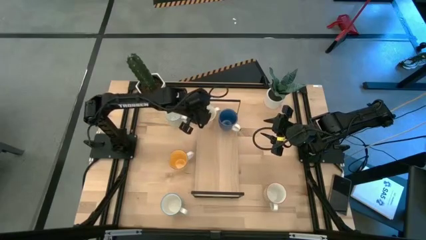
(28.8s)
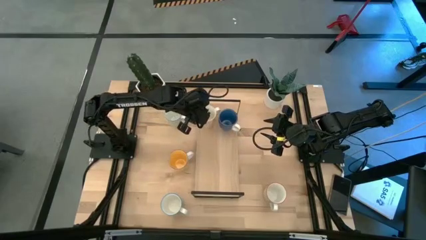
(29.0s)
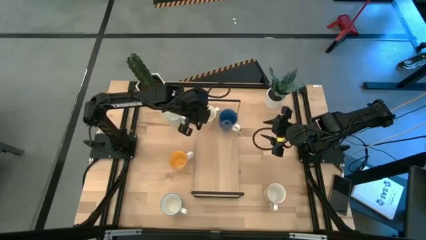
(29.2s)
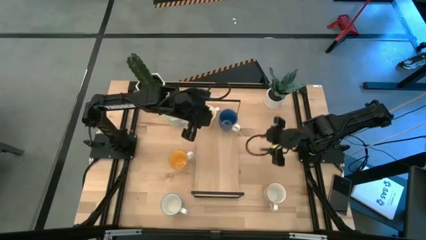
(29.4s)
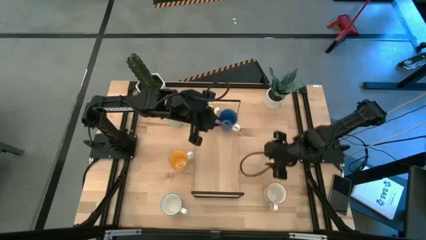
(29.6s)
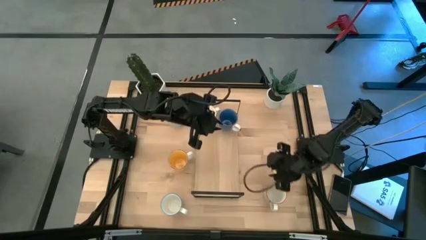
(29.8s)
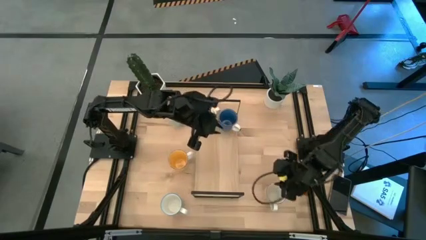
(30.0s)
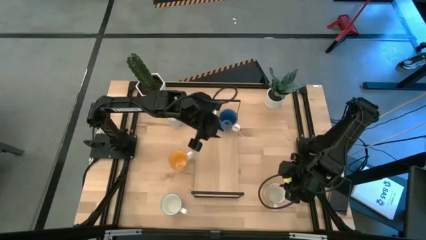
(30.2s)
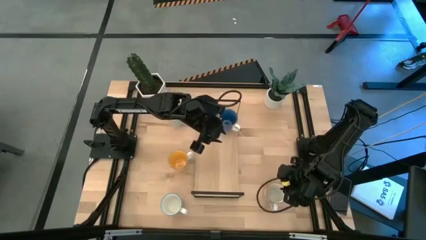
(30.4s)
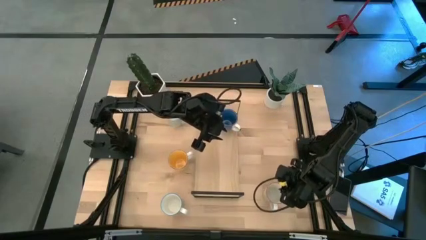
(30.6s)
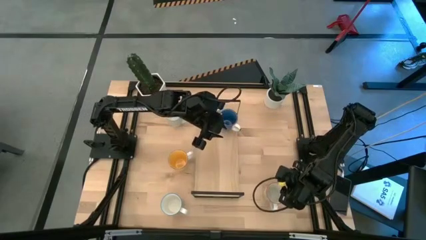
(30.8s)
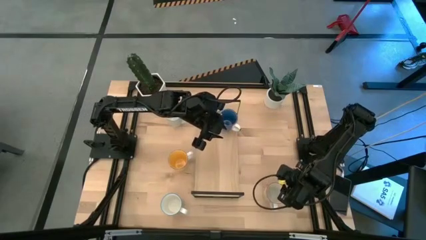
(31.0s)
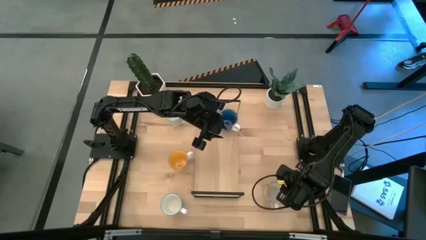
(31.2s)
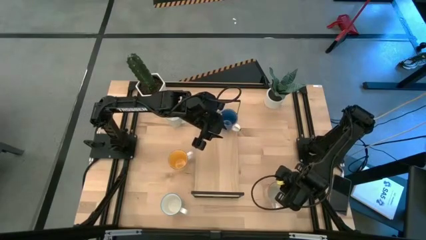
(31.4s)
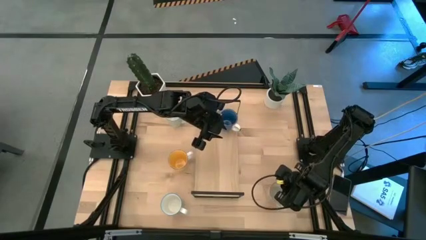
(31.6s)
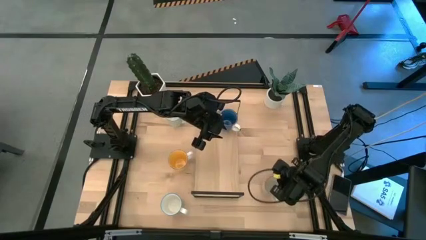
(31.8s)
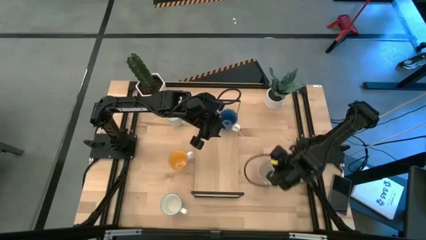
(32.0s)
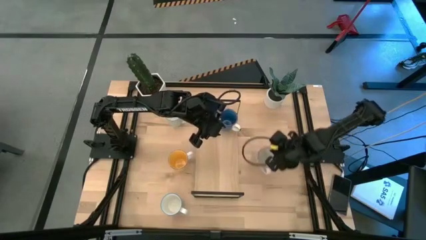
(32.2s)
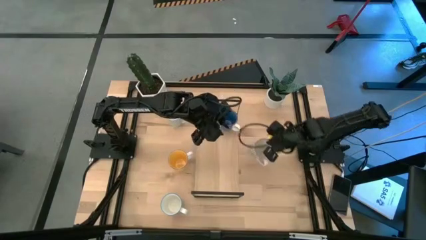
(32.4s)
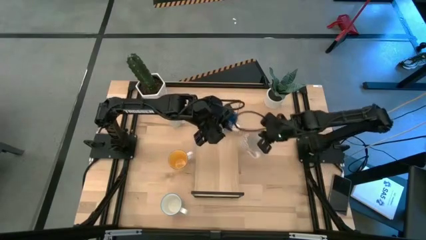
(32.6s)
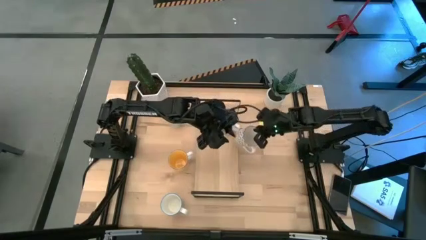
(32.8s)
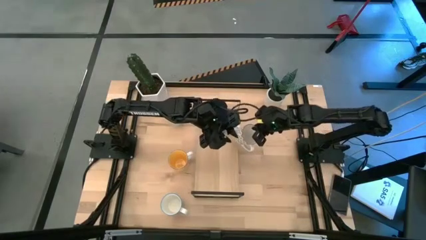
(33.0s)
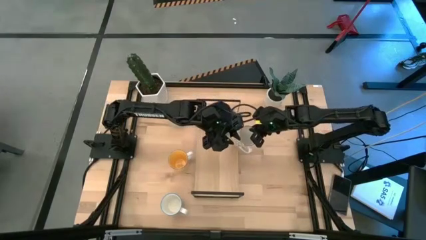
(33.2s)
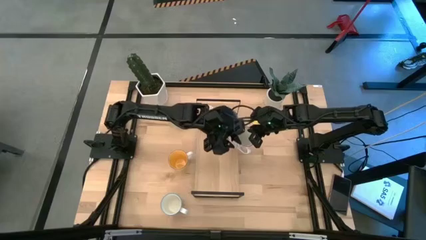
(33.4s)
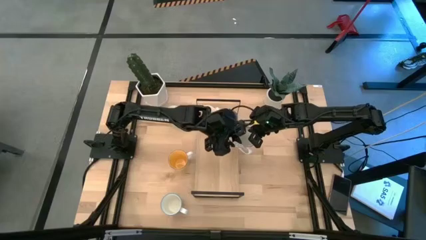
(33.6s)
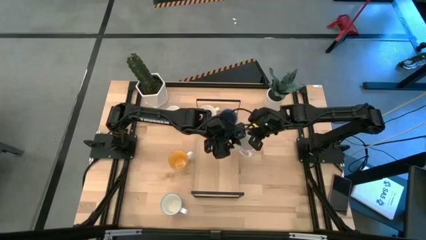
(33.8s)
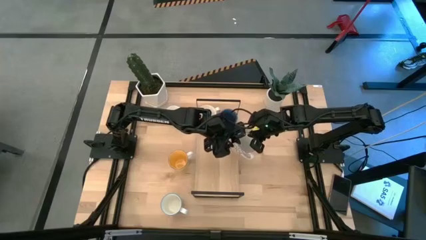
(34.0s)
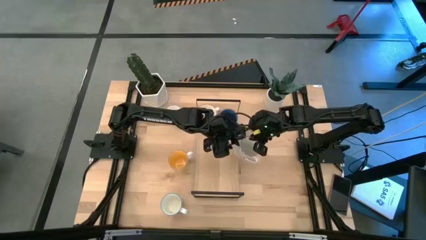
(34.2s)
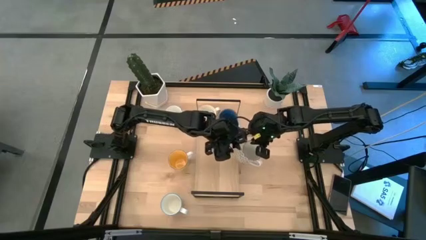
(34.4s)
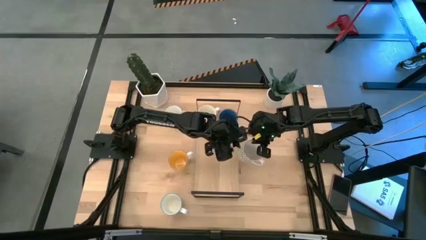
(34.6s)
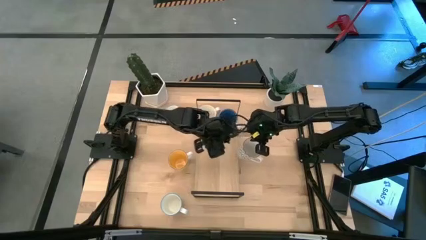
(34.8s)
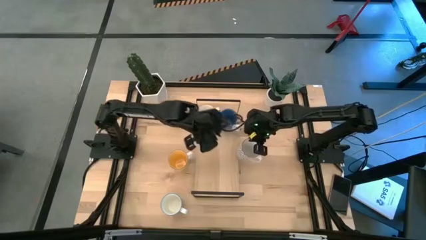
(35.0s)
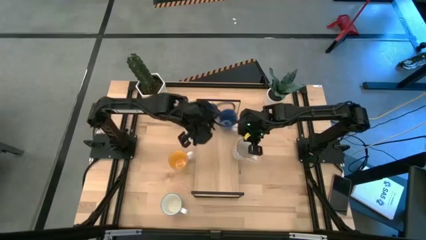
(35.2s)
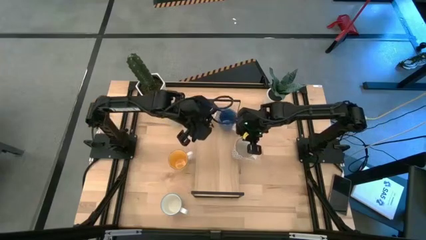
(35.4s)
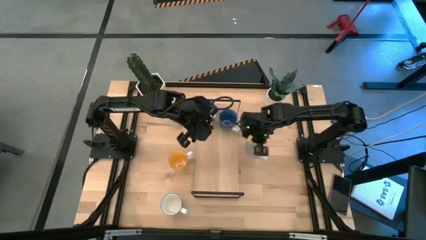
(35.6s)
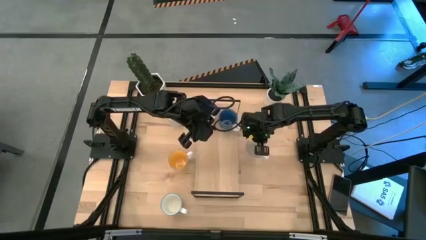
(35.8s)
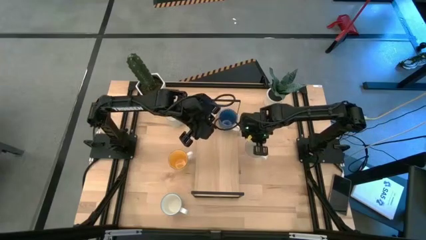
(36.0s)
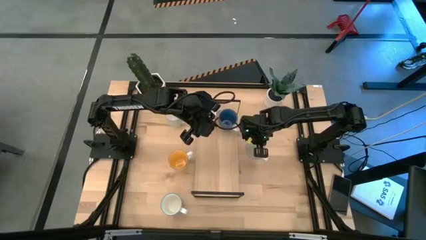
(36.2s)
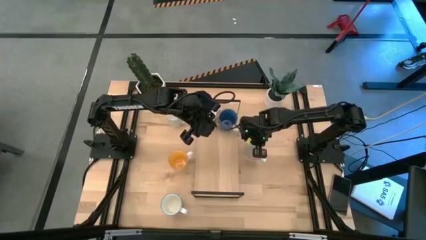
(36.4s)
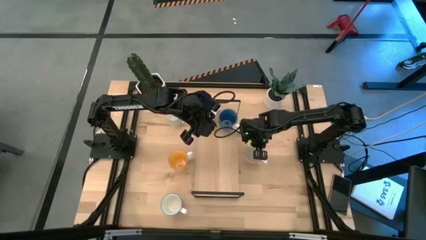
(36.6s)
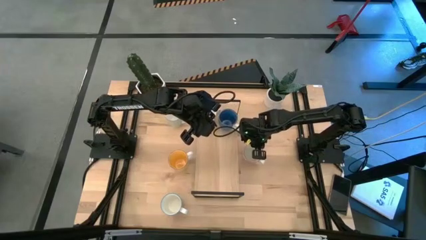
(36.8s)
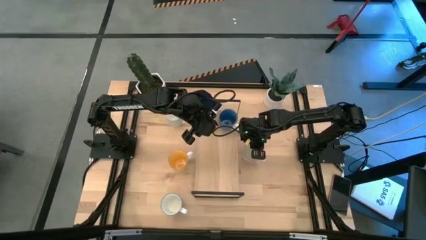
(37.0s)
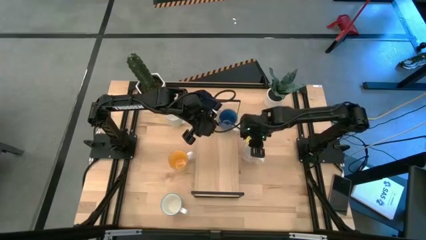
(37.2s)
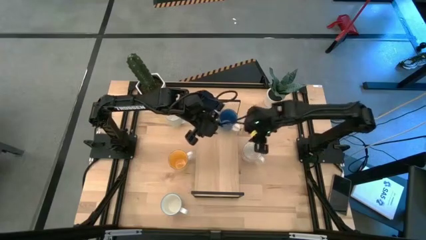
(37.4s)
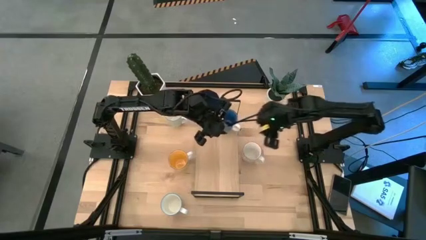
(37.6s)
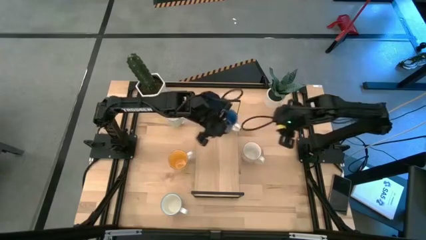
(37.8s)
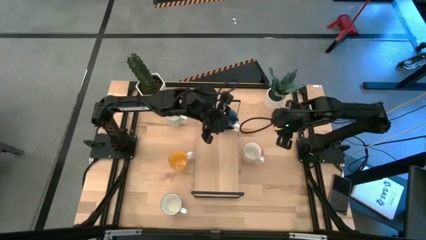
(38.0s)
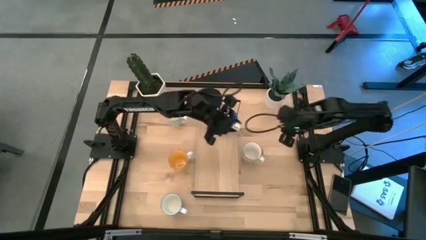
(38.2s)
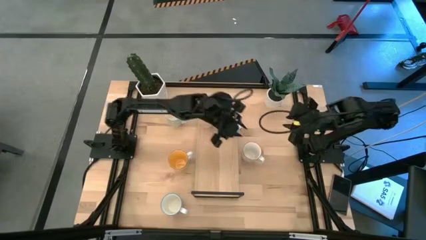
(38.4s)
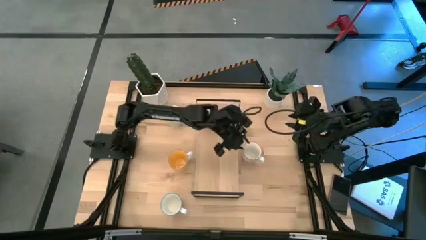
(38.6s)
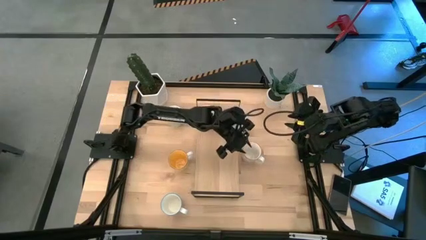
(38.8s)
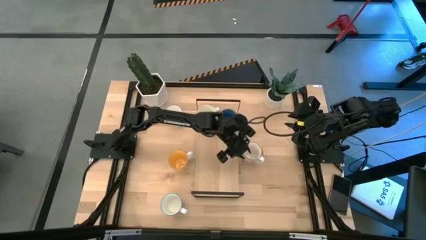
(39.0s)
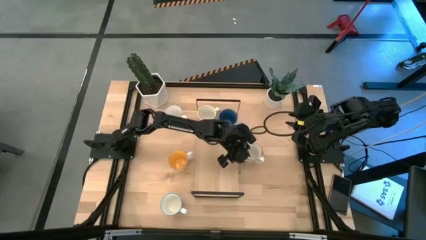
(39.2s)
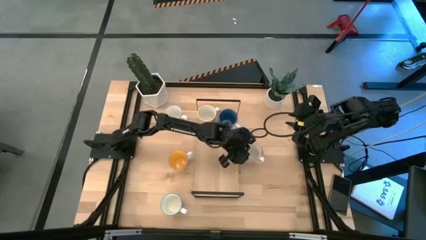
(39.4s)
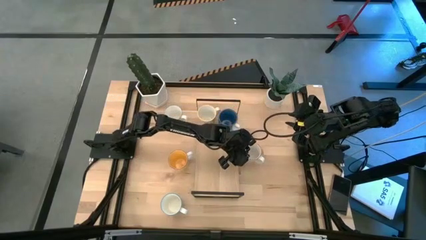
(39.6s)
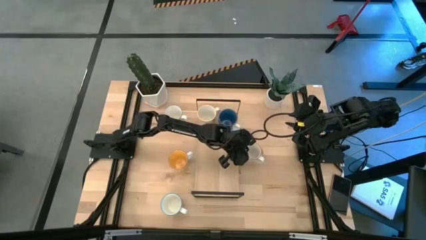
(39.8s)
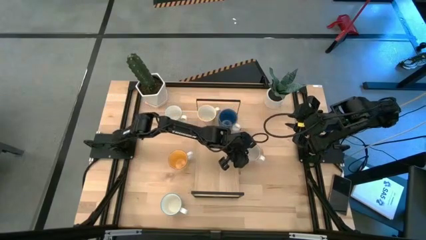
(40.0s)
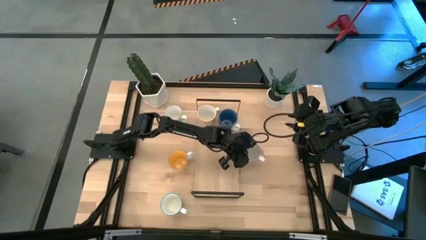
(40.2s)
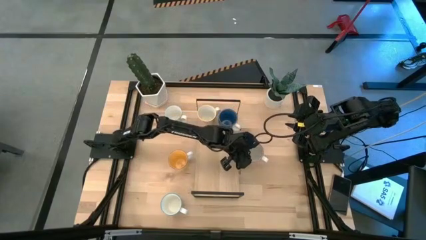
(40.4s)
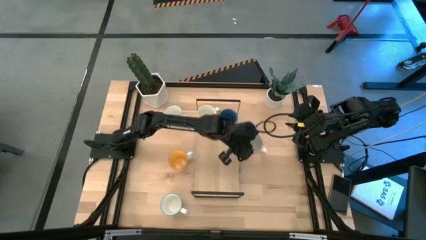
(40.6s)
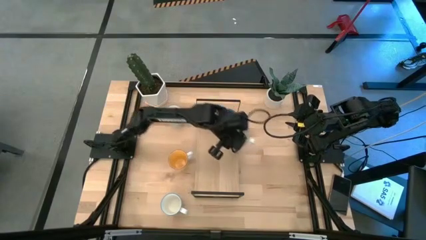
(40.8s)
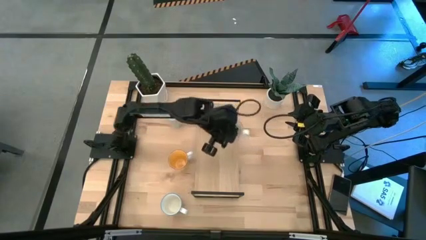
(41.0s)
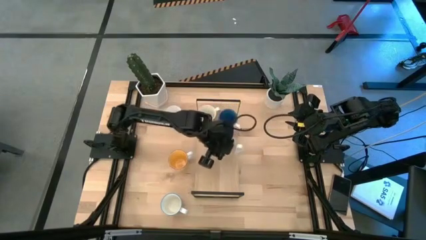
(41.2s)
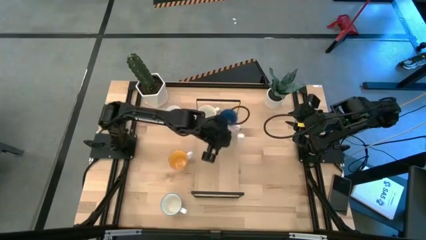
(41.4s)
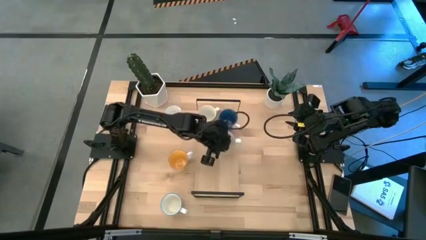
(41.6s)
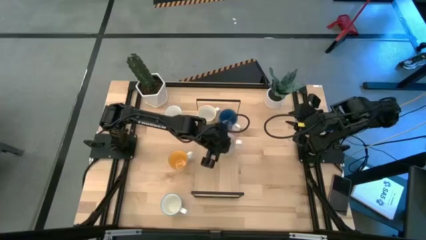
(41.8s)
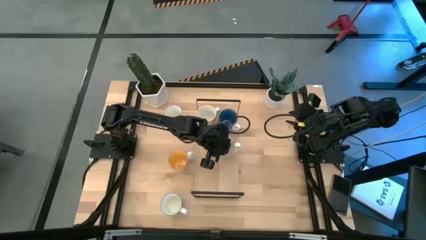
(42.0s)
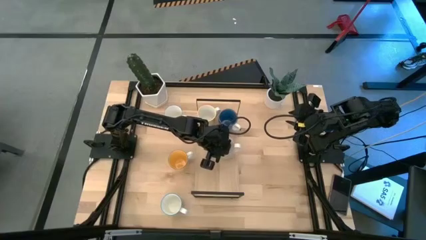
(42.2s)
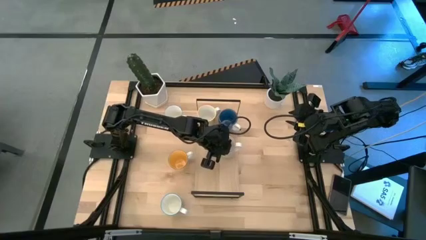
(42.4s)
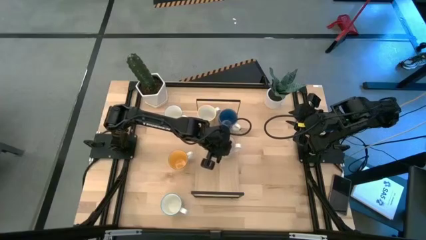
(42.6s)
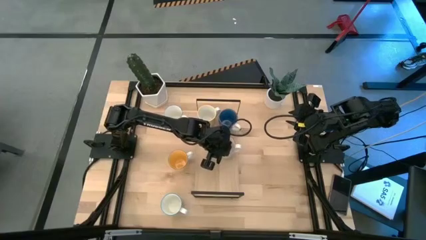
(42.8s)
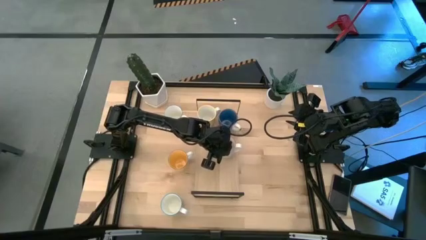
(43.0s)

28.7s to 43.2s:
Task: Place coffee mugs
Put the gray and white mug on the shelf

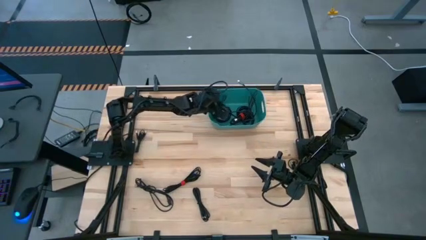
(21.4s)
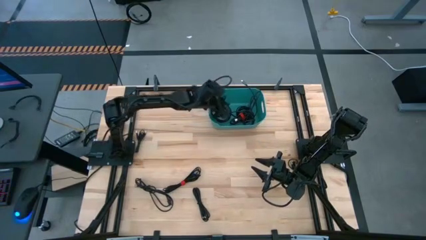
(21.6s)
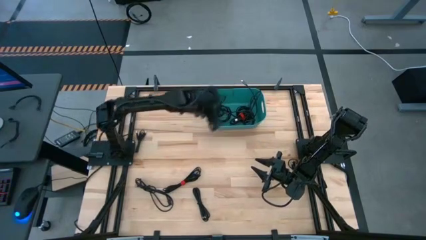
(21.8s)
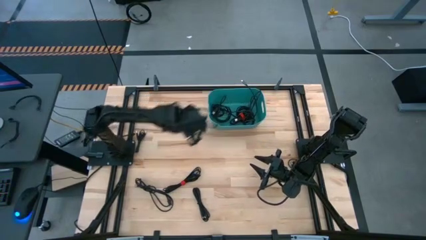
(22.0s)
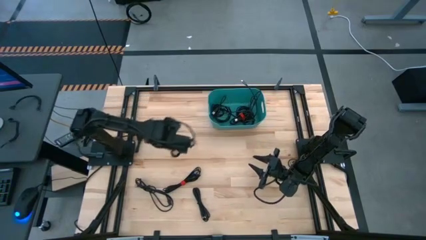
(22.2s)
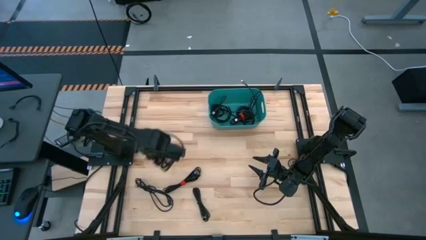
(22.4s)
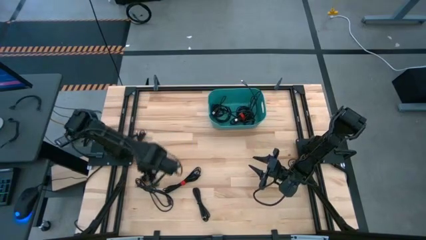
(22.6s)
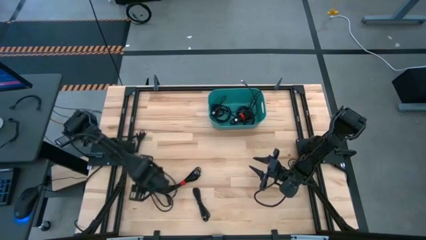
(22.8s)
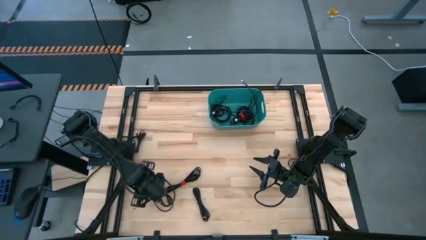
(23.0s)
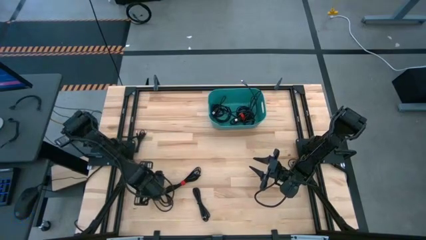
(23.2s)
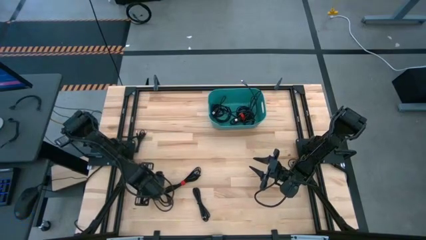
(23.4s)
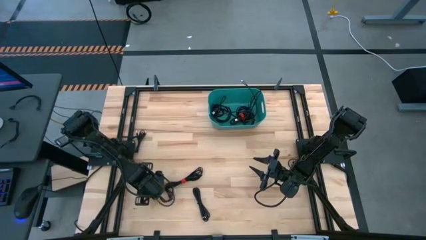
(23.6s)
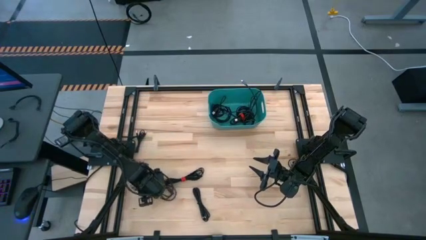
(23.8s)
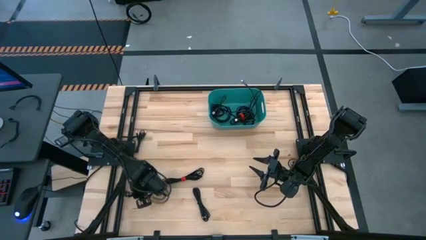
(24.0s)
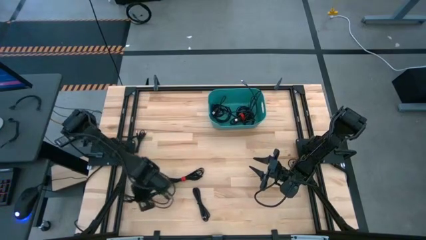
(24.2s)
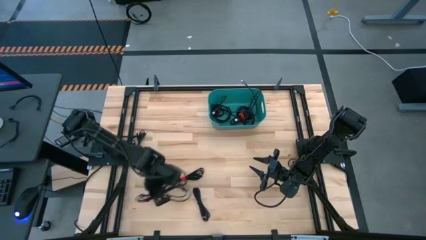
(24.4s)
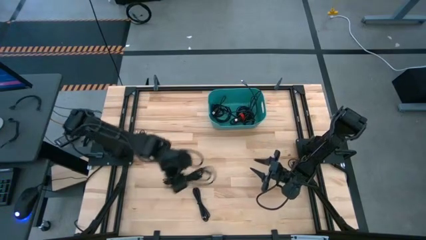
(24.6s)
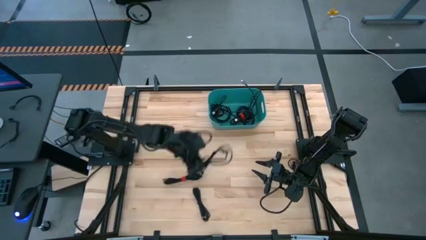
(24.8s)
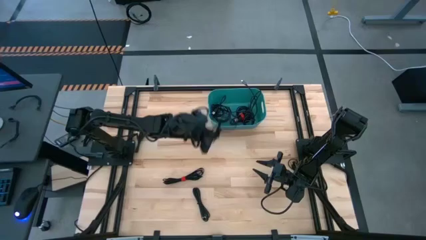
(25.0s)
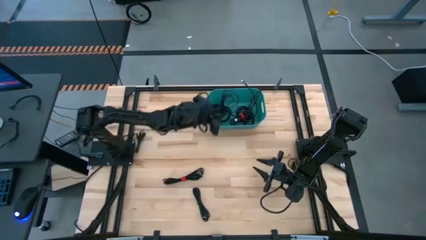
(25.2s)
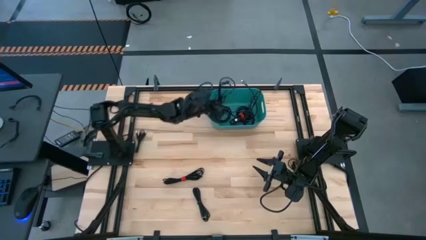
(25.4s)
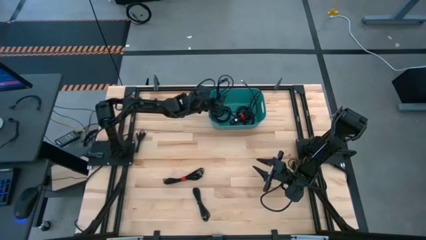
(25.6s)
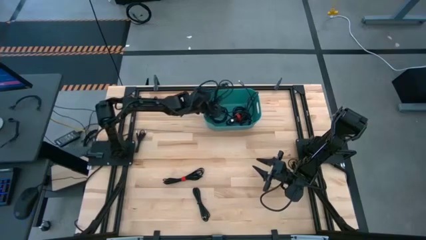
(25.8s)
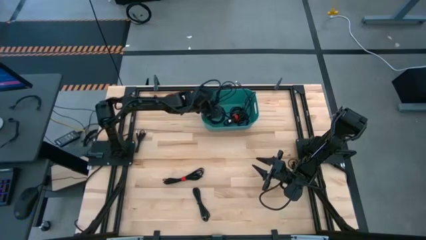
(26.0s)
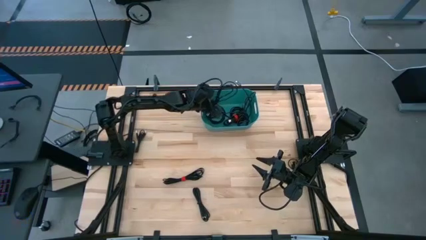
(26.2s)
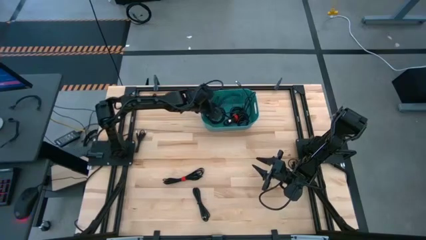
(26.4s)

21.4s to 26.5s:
Task: Pick and place USB-C Cables
Put the black charger cable into the blue bin
